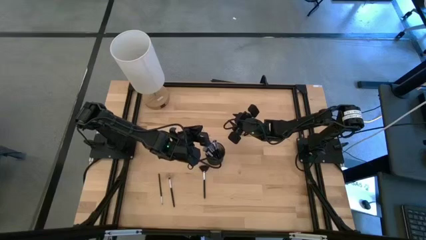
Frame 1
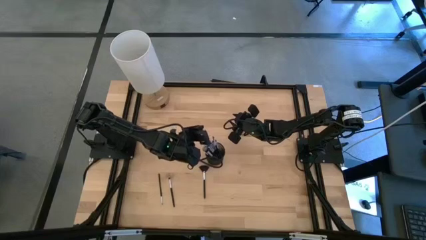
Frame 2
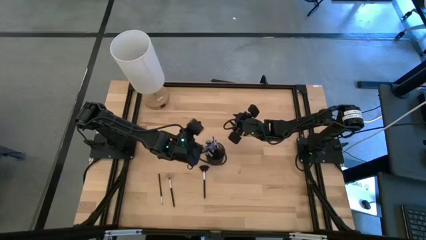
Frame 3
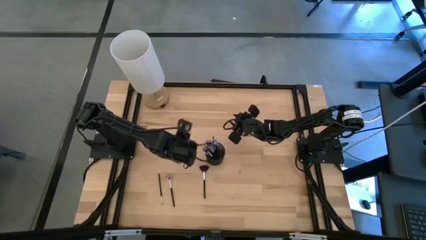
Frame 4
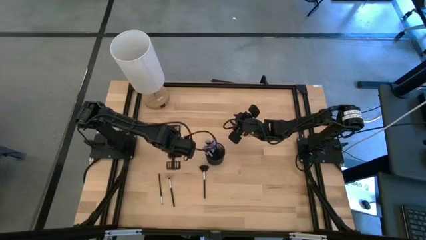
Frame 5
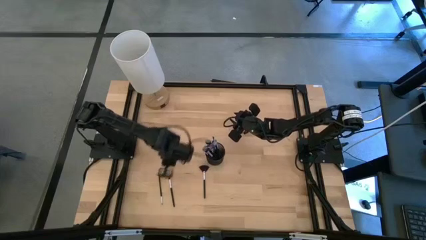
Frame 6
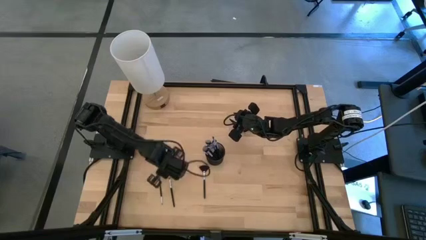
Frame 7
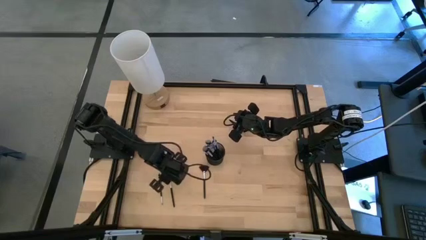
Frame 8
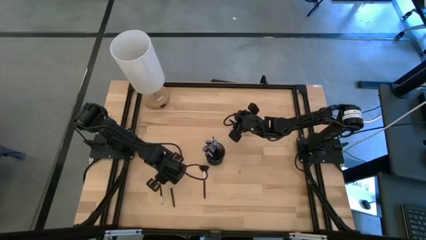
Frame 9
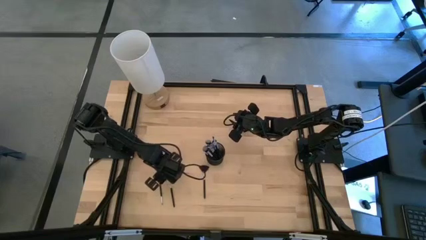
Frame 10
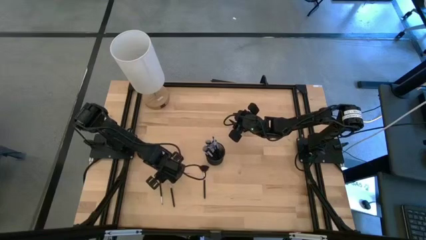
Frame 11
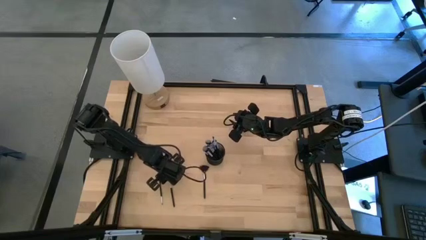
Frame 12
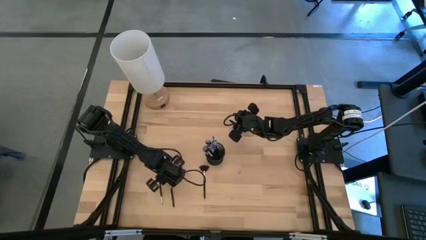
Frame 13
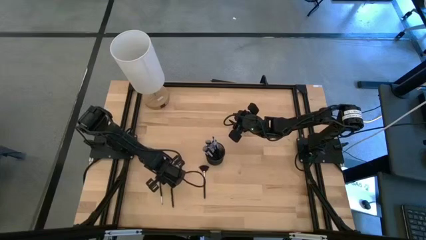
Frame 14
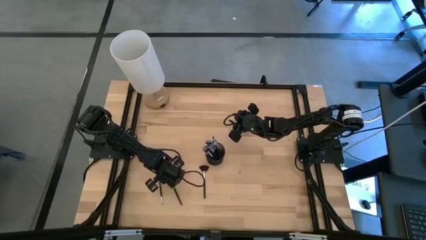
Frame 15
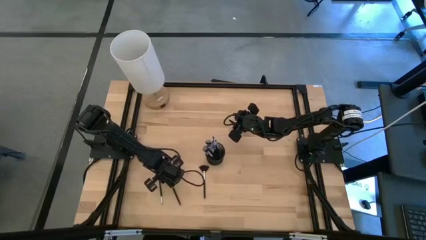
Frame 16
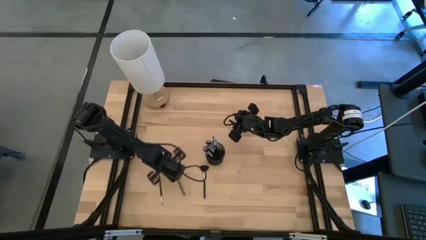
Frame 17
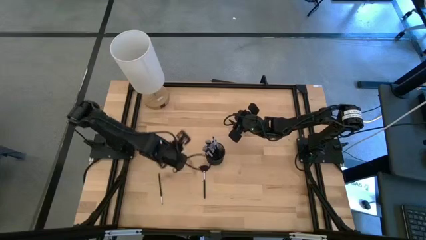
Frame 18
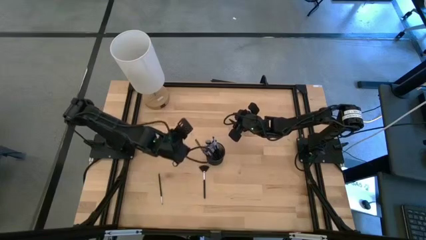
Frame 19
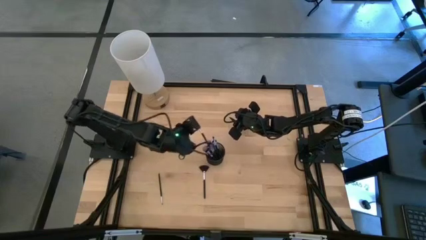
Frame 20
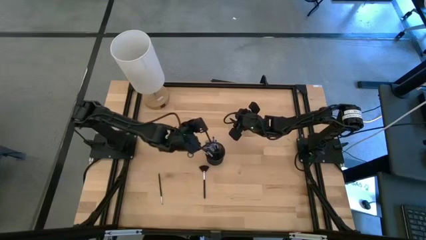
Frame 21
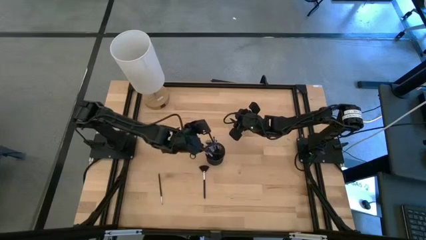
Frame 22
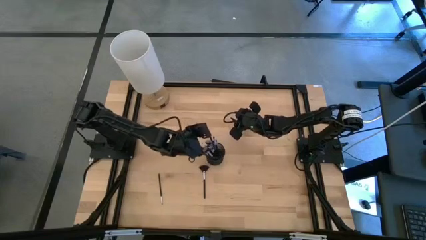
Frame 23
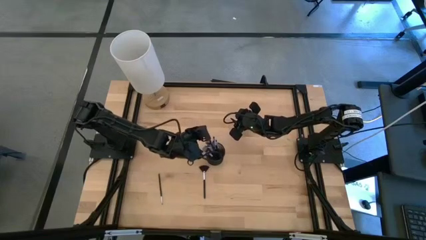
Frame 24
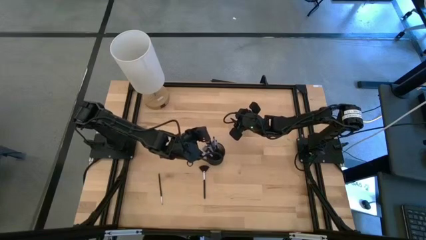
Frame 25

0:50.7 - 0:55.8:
Task: Pick & Place Makeup Brushes
Put the eyeshadow brush into the makeup organizer

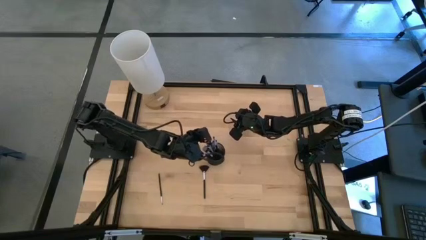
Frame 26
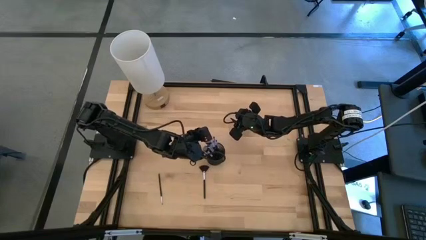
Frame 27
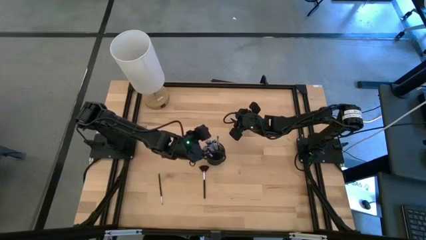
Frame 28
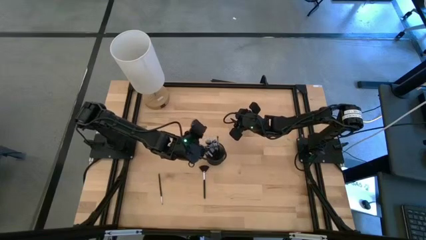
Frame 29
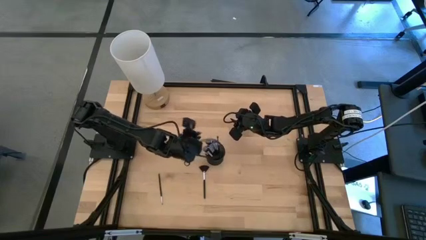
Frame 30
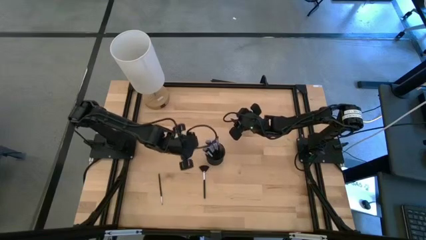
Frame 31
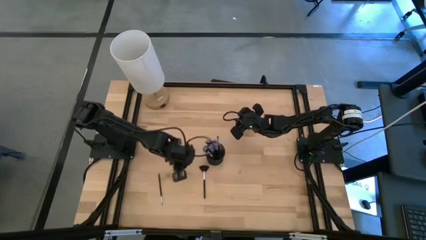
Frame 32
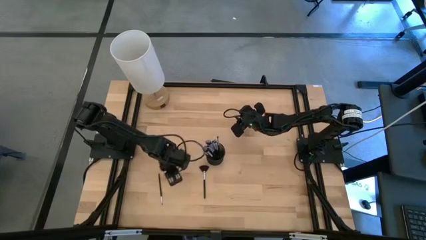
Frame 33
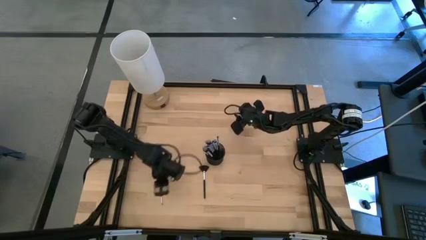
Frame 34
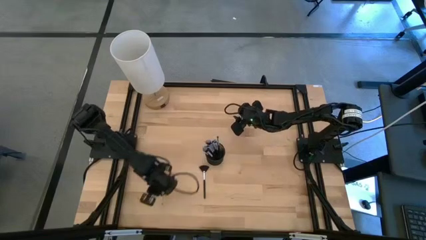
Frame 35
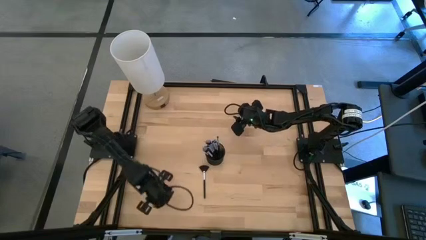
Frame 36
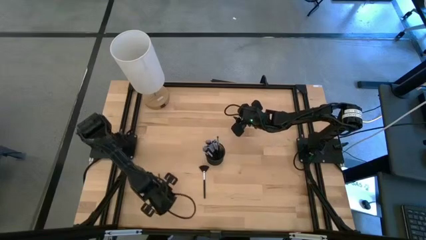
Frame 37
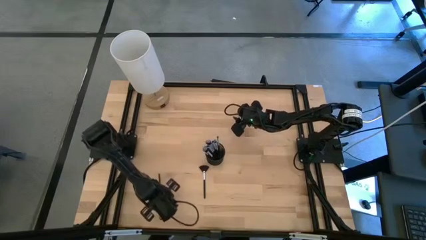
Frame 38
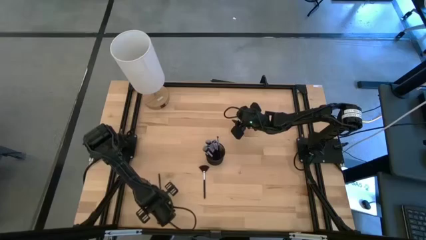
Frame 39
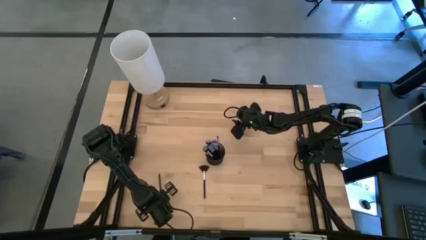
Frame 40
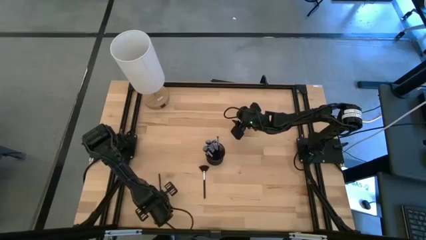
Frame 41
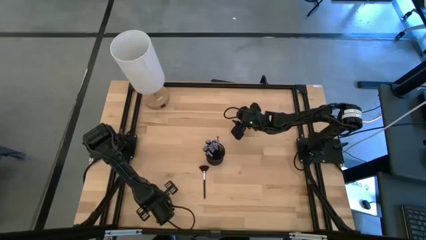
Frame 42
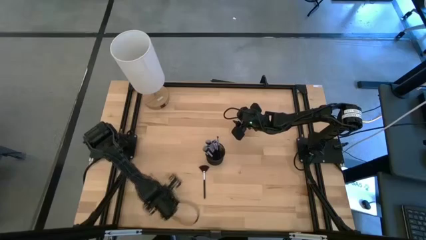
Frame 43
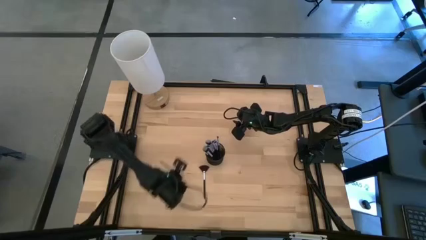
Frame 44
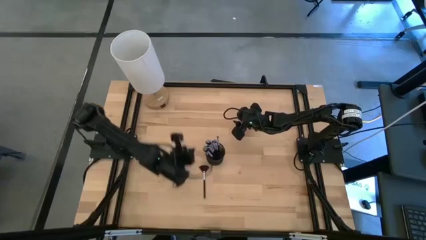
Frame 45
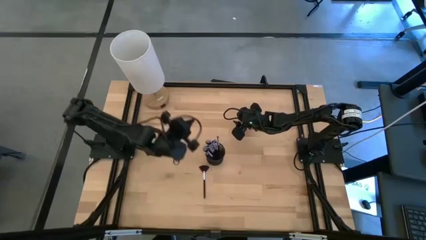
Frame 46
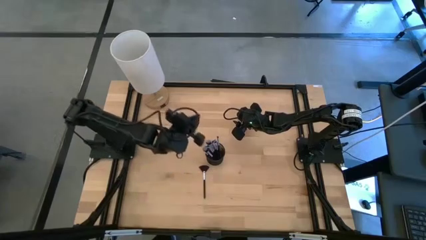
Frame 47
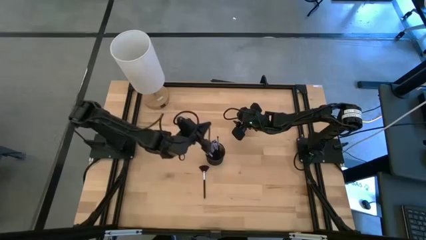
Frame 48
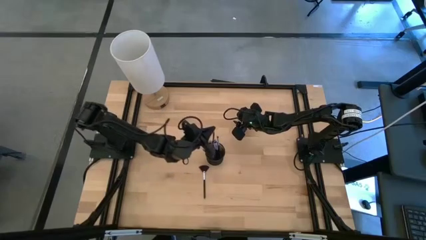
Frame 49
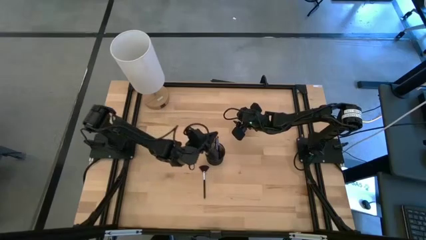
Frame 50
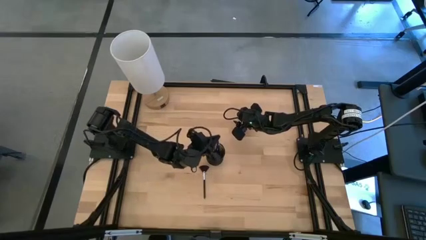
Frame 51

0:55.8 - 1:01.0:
Put the eyeshadow brush into the makeup organizer

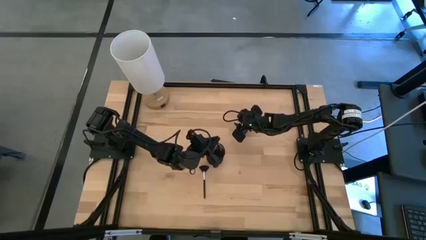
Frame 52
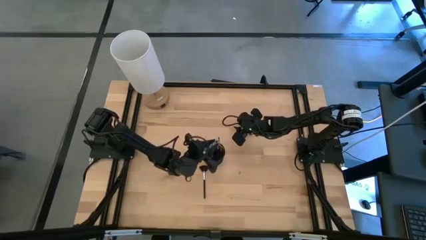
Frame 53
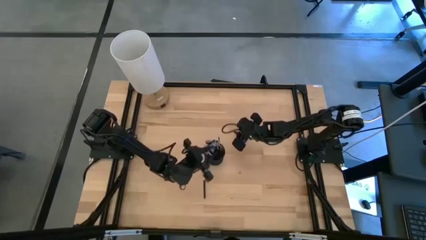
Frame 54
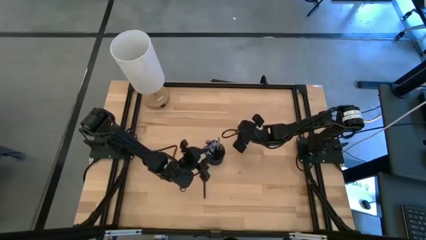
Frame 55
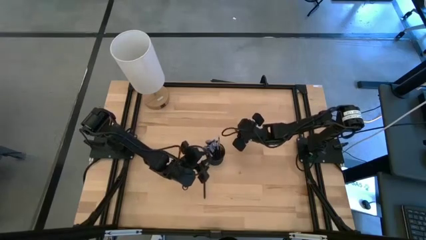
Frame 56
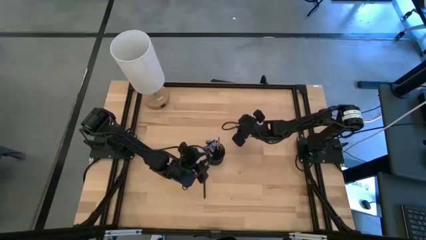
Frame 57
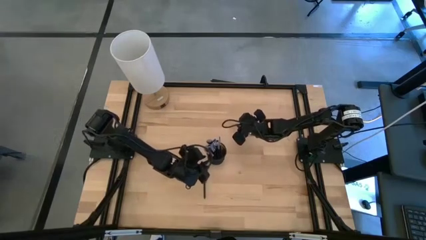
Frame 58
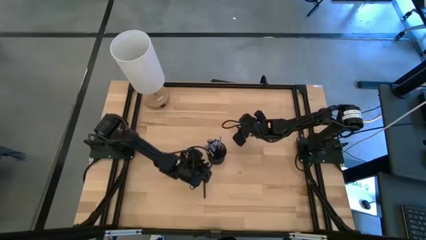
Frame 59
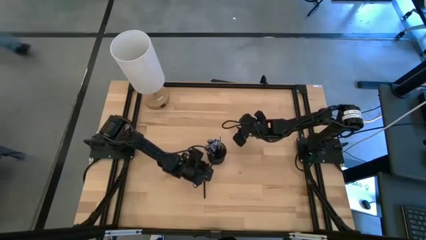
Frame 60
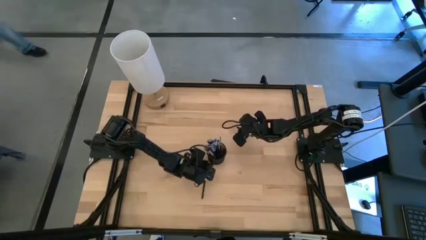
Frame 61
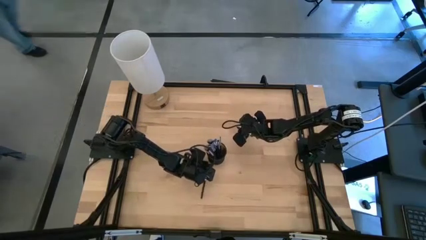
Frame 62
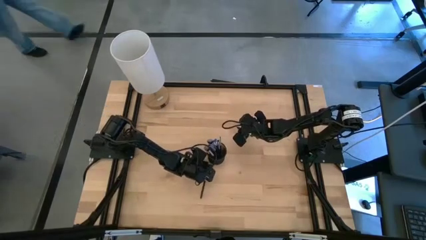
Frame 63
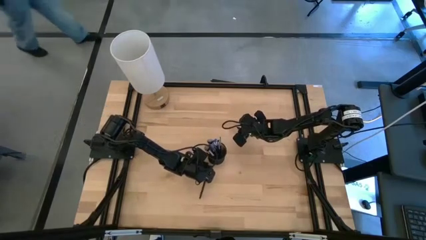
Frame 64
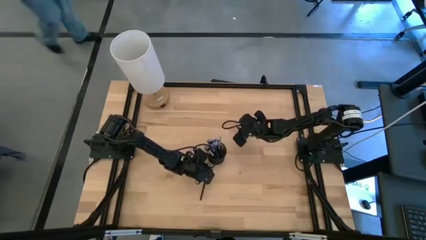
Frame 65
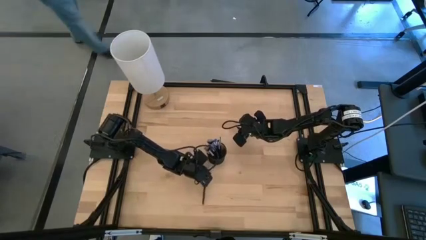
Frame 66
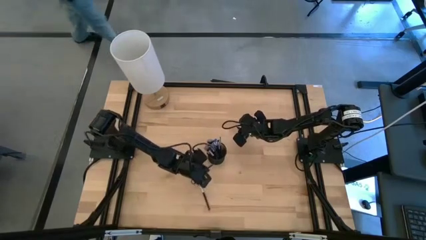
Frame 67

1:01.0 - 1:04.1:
Put the highlighter brush into the makeup organizer

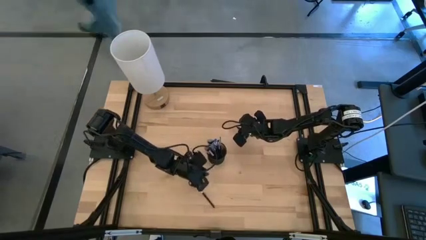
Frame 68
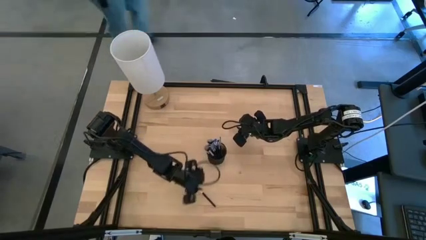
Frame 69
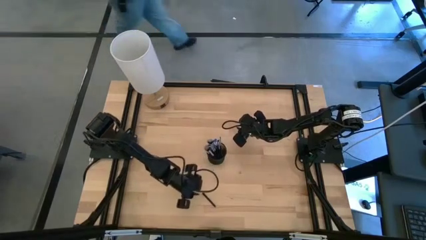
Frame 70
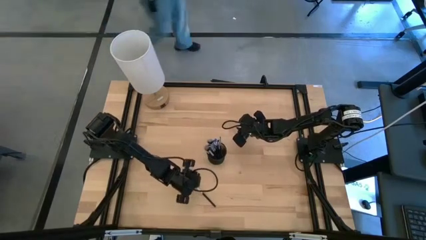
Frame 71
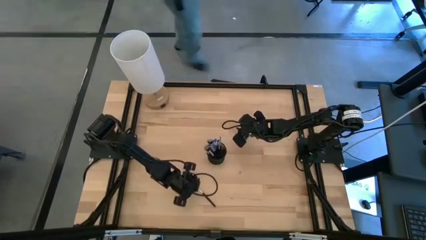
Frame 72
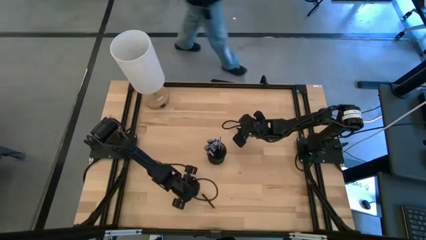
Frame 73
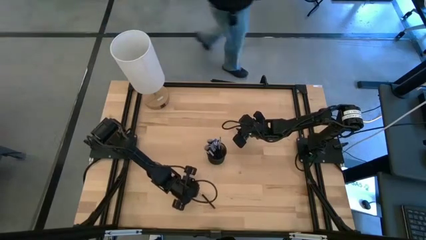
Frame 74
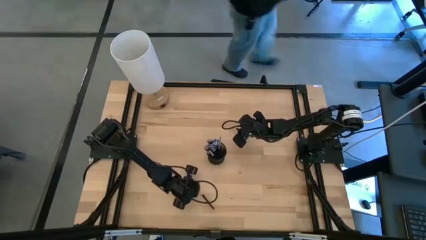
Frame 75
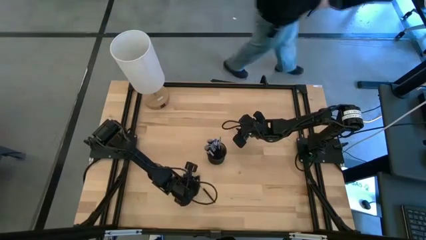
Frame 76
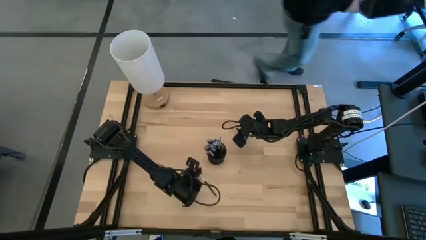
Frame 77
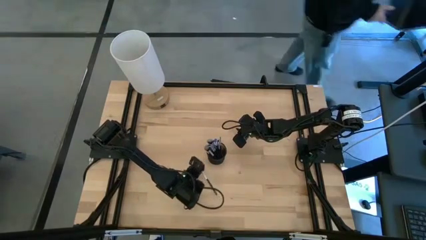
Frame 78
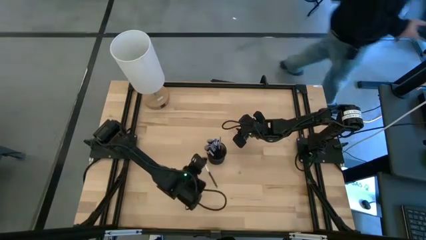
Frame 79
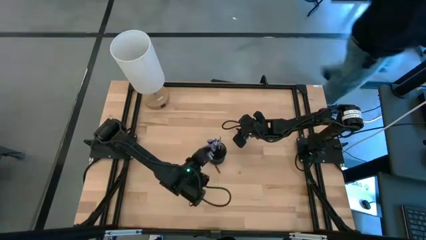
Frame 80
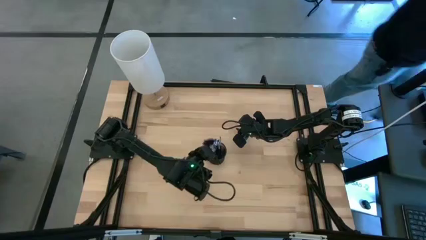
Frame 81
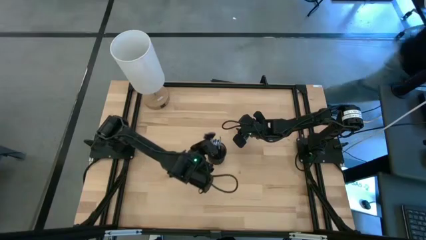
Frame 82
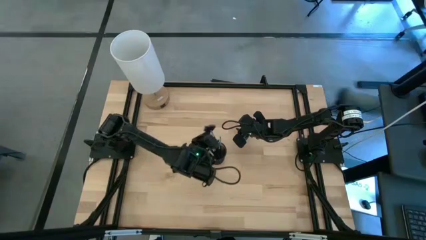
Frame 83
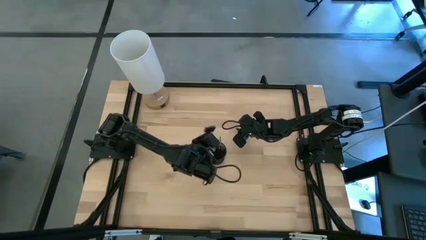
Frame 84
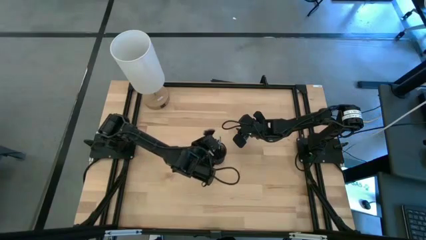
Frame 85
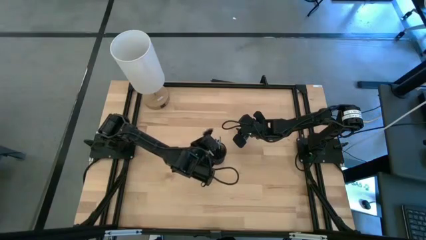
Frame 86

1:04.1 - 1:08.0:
Put the highlighter brush into the makeup organizer
